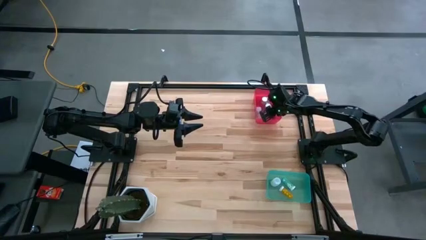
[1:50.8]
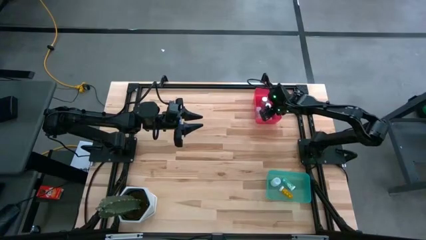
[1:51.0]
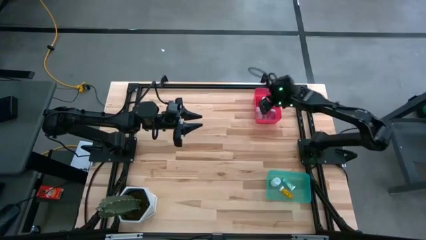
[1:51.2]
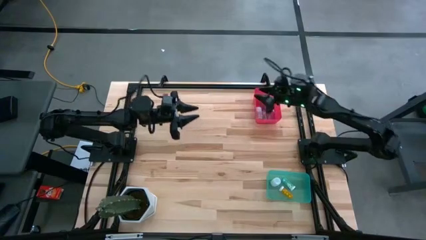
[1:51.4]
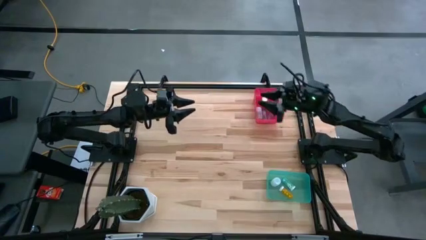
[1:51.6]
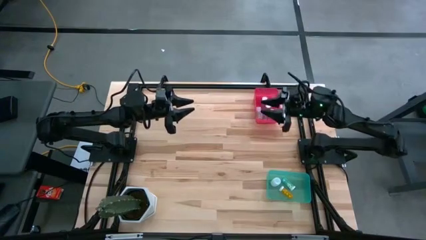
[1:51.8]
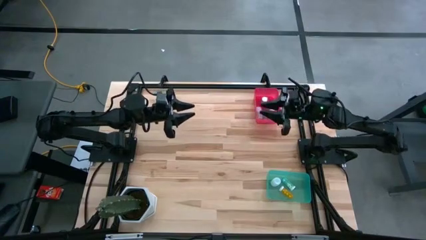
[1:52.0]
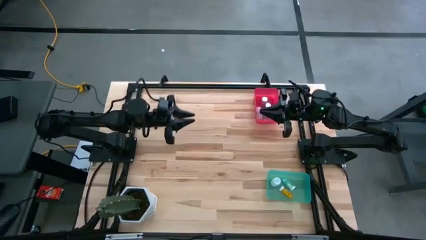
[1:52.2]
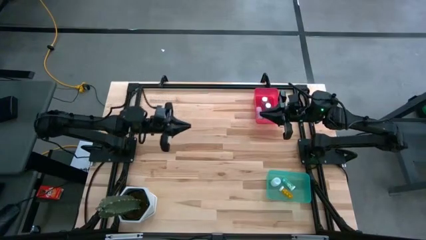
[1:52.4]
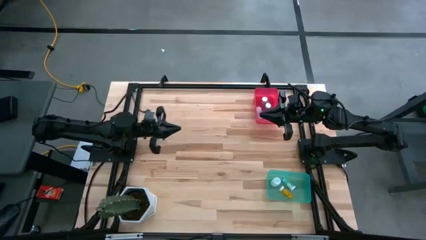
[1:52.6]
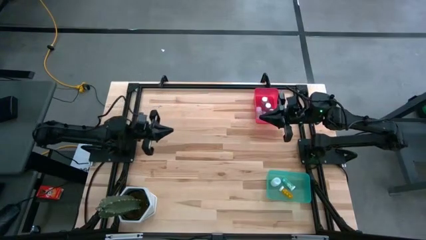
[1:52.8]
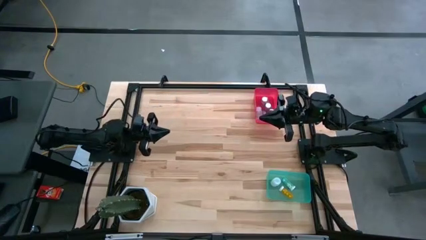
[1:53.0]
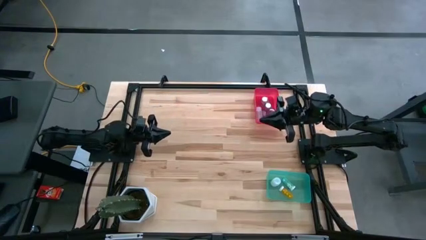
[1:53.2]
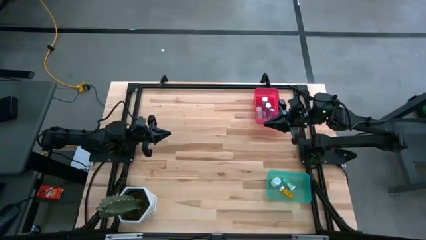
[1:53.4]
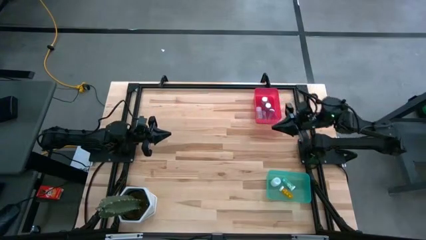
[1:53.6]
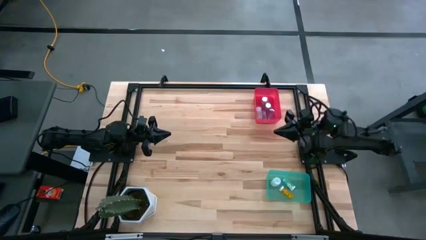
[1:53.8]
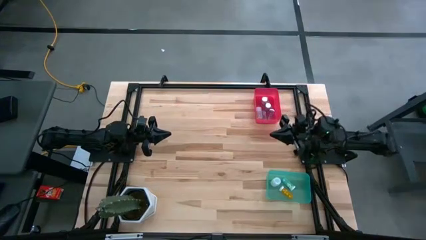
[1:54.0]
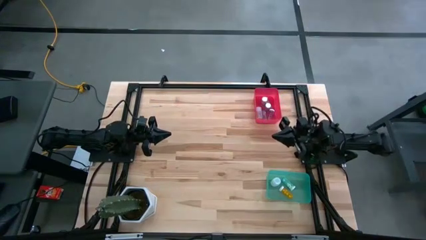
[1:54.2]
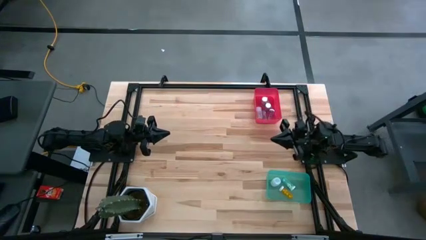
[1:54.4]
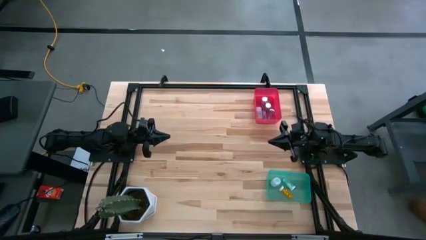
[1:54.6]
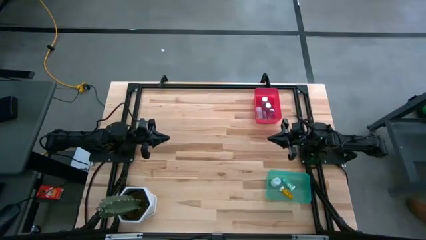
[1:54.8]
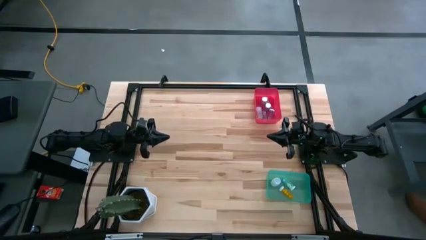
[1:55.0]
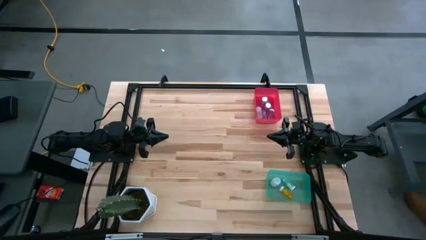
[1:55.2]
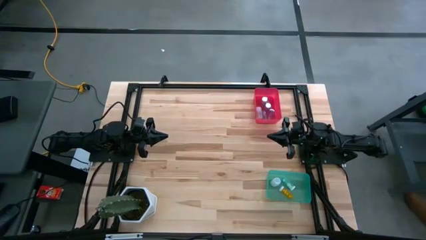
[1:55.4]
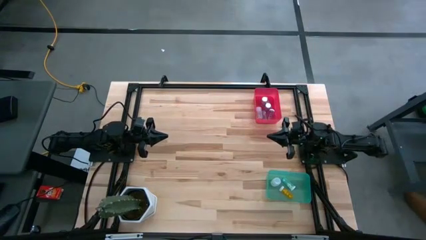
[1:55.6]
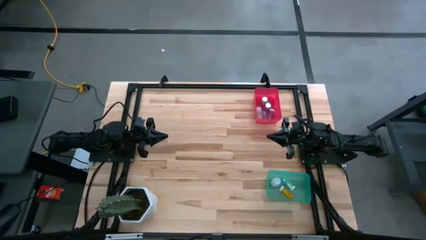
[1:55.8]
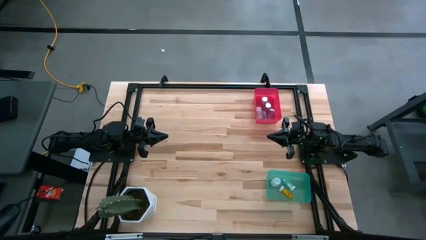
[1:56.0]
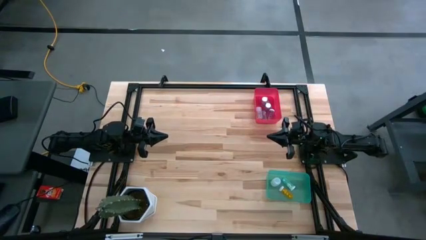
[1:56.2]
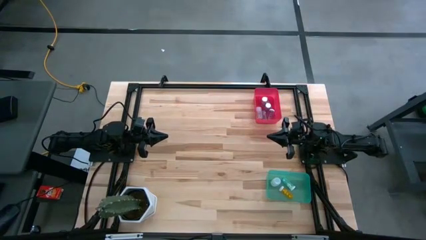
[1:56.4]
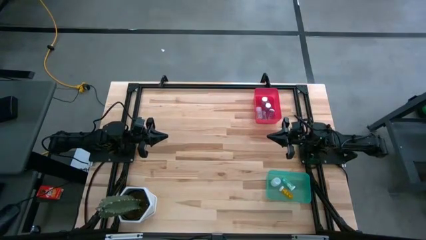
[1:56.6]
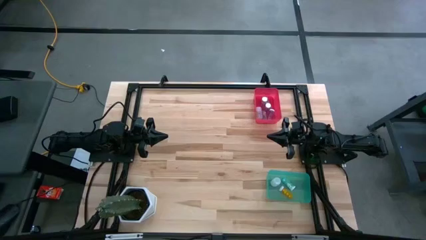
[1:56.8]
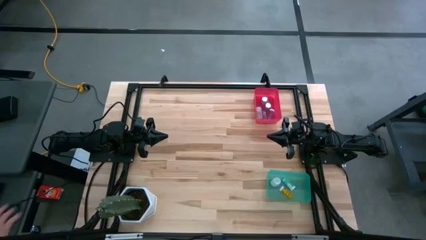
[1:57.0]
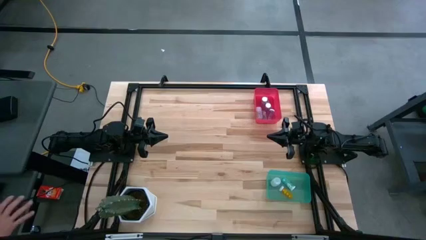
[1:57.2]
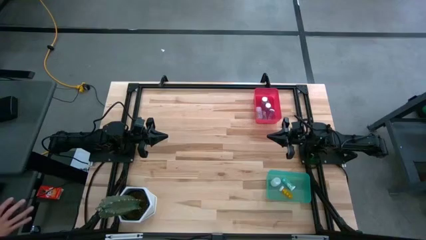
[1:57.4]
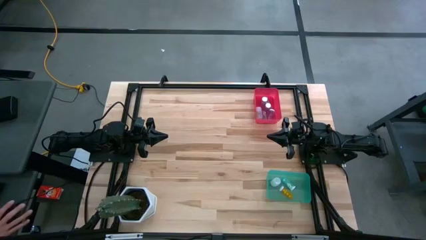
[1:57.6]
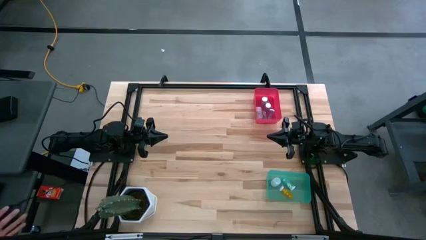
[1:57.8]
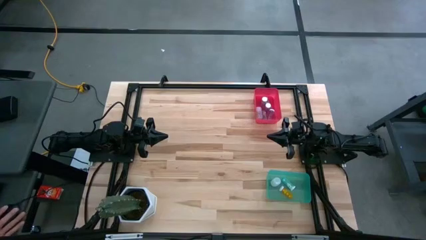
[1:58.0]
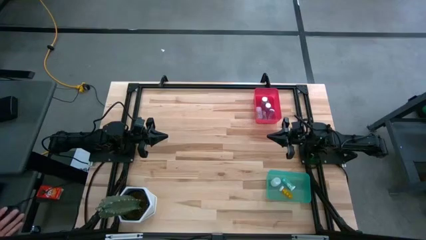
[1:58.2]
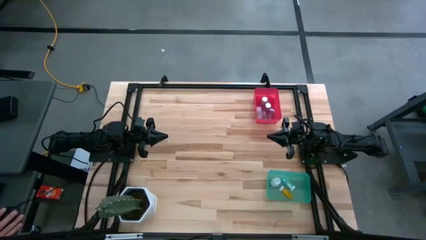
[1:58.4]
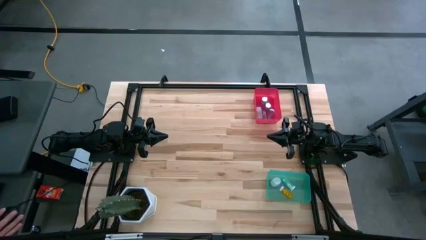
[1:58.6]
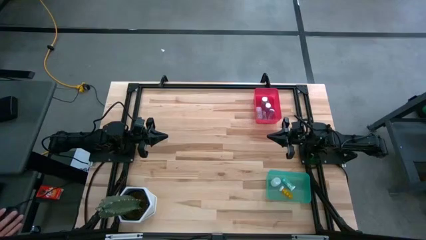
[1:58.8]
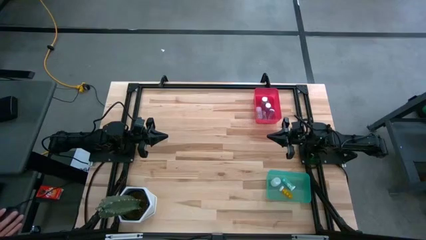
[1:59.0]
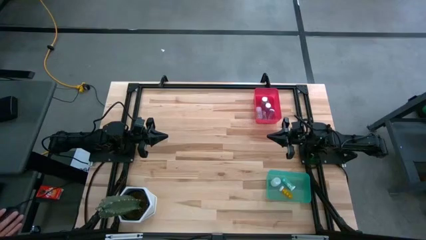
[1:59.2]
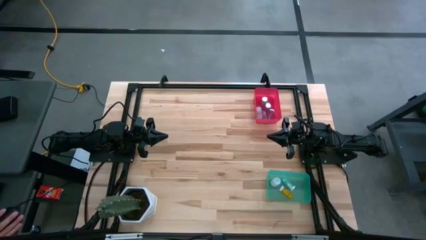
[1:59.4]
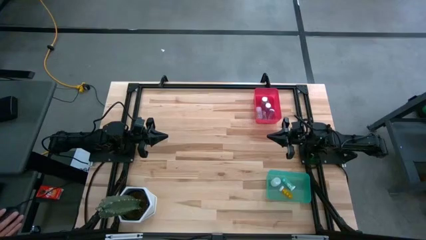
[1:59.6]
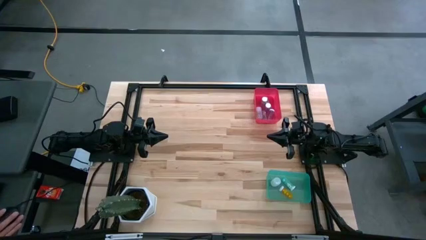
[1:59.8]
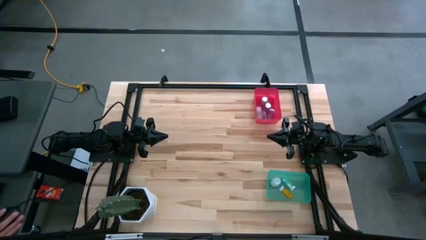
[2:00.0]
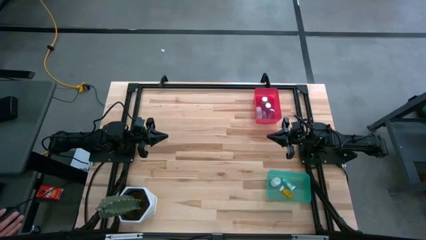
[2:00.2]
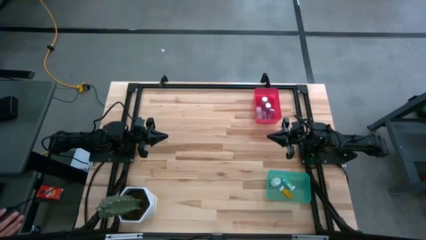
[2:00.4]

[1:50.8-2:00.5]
Task: Pick and place medicine bottles into bin by pill shape (circle, oval)
Return to Home Position

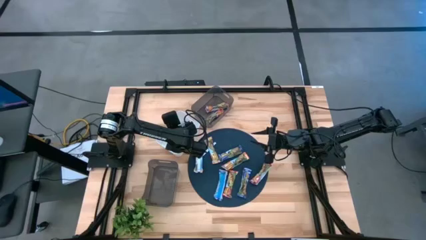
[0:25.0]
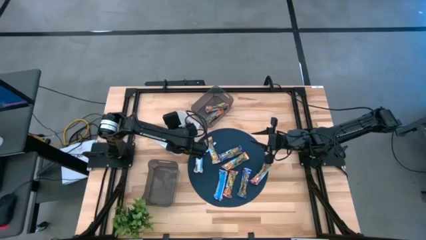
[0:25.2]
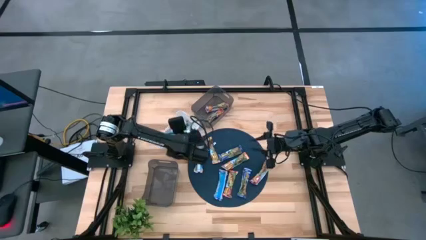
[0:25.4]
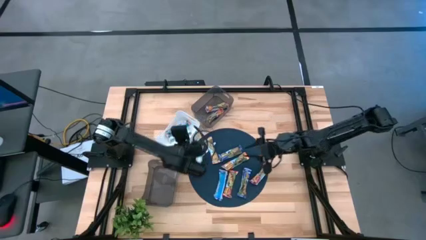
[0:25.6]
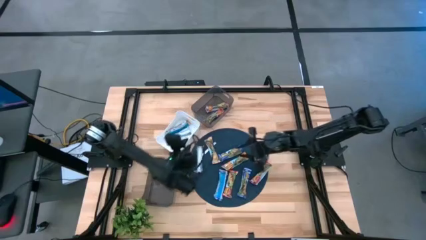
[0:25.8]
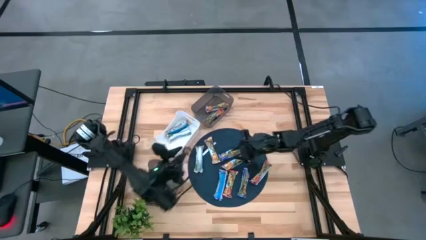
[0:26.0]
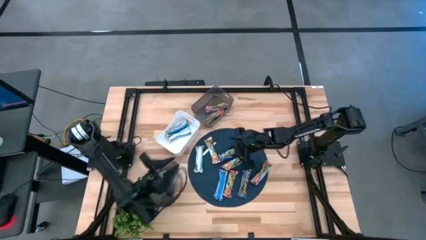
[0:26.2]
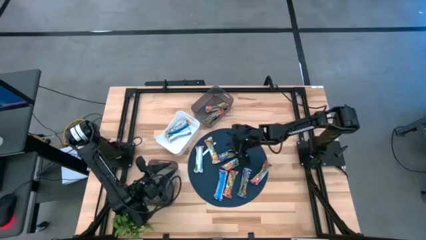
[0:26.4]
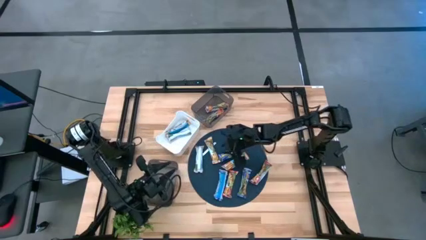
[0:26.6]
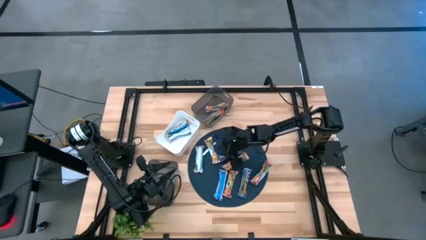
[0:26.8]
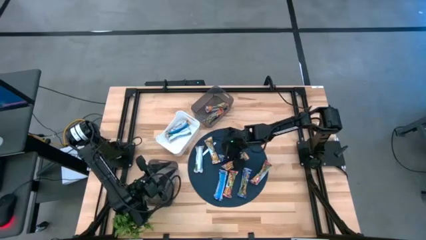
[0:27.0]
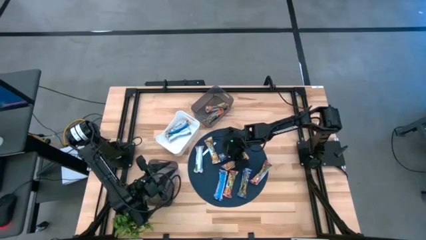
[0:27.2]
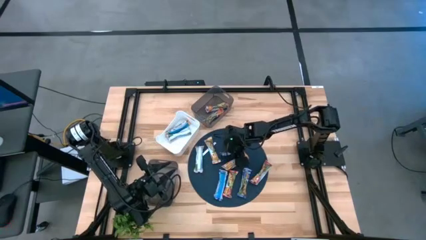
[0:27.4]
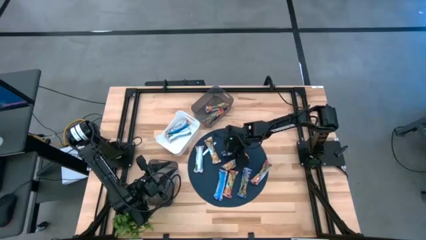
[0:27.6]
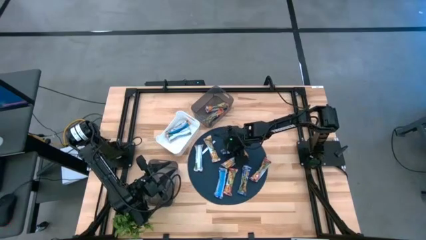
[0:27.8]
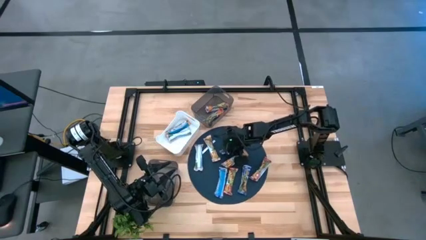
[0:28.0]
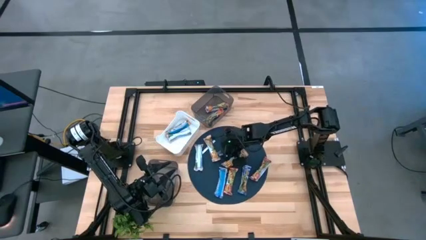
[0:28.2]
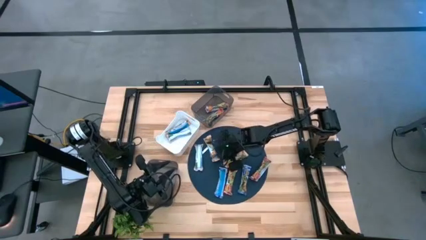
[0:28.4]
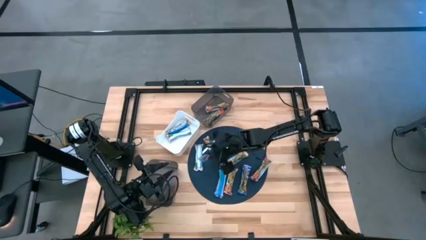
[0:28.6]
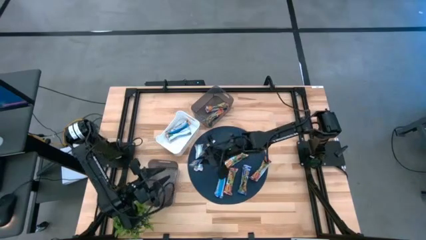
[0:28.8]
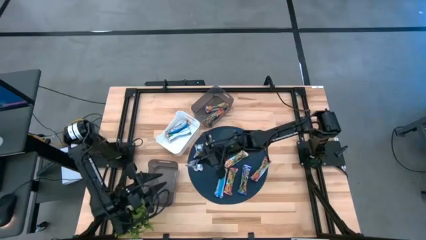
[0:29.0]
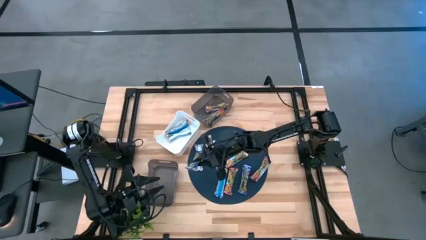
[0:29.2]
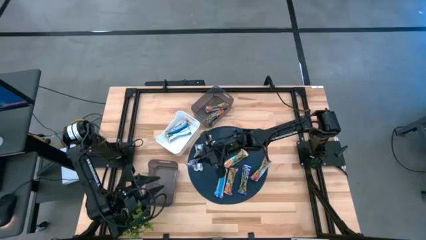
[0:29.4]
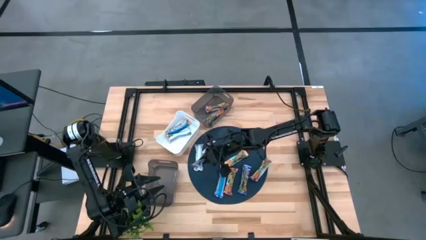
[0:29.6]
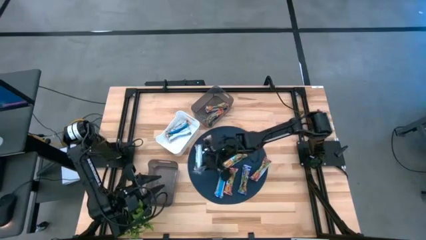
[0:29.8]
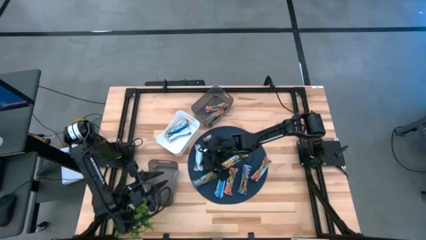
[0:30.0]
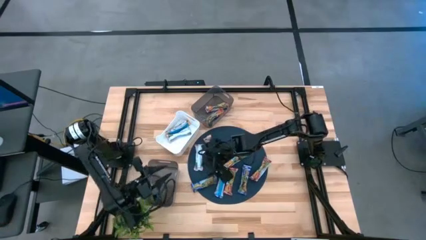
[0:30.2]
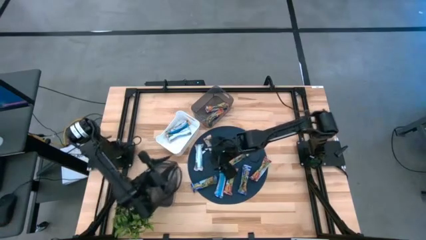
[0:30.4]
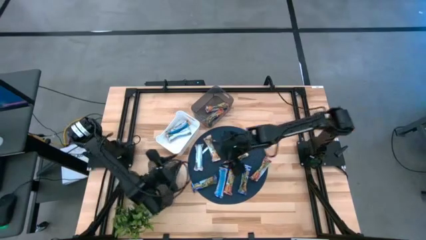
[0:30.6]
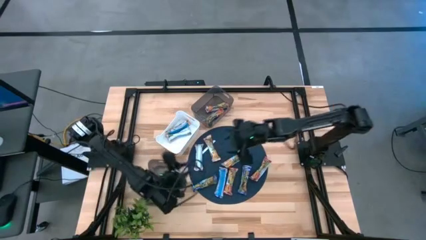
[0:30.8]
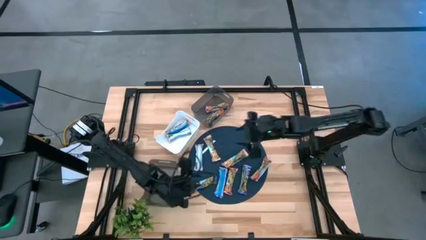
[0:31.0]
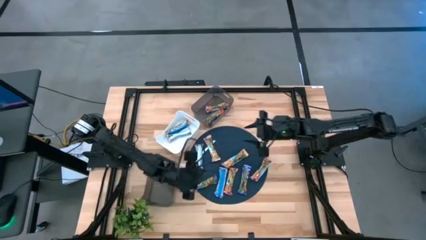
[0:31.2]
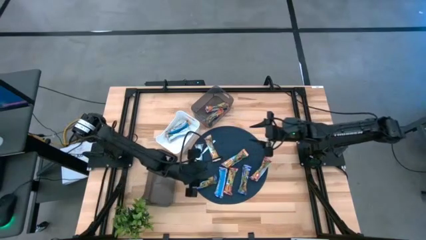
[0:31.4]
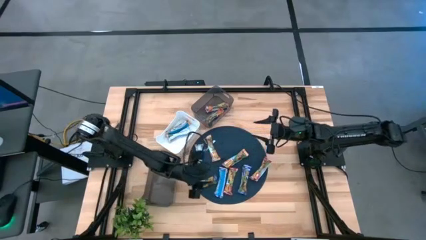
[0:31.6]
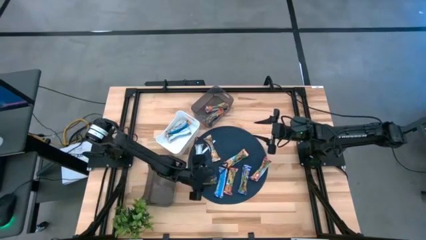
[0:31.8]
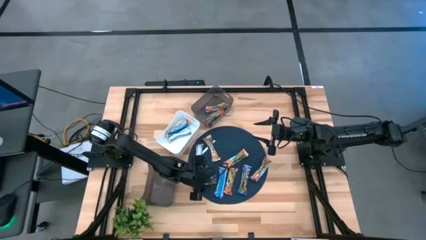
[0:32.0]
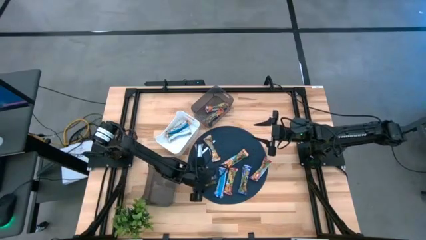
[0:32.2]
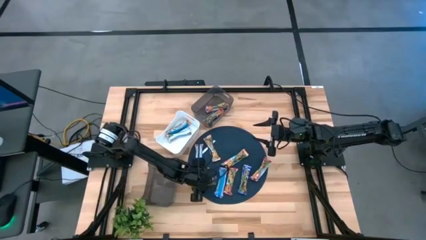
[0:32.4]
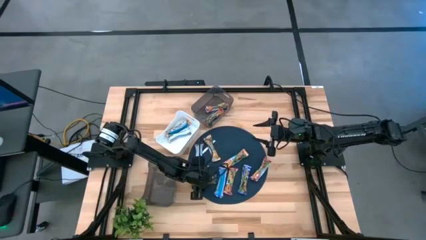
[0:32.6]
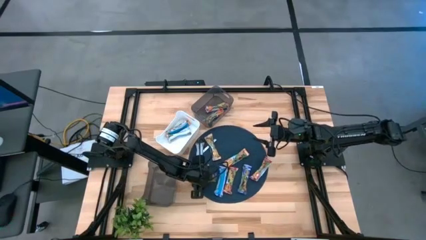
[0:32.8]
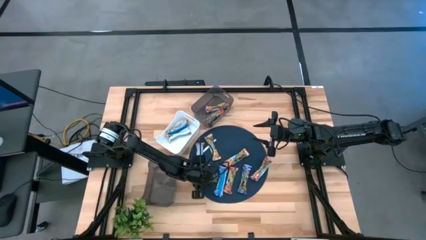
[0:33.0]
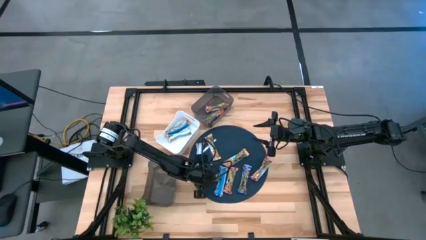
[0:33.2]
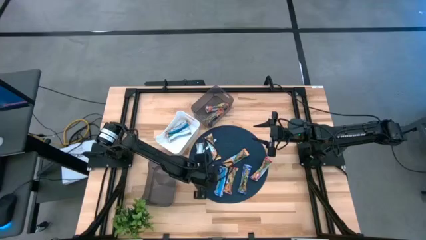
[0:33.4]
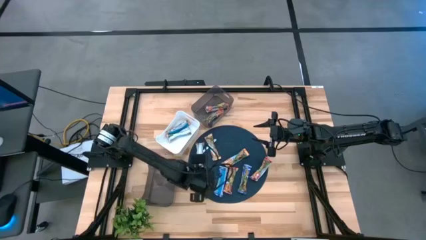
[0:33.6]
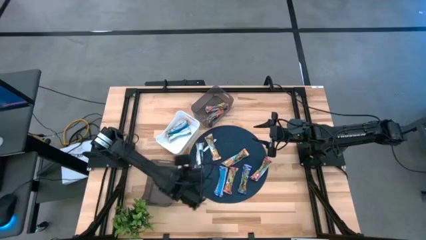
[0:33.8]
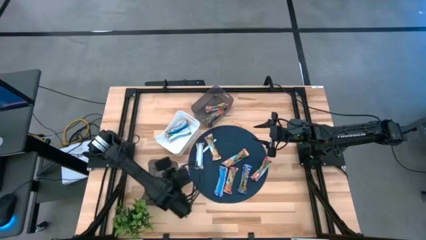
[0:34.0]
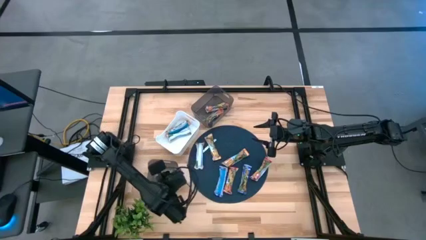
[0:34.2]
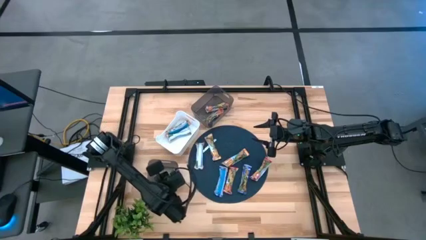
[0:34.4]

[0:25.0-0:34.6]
Task: Pick and place Granola Bars by type
Put the blue granola bar into the bottom black bin
